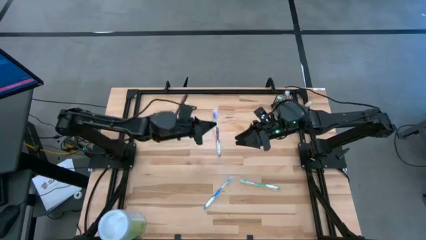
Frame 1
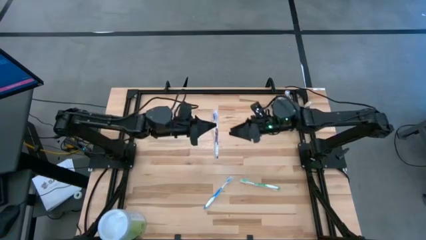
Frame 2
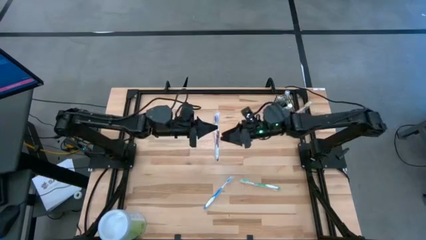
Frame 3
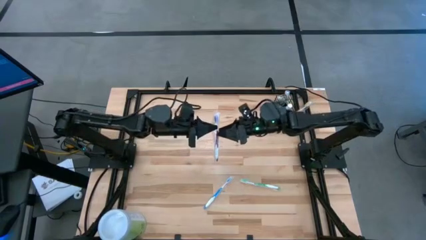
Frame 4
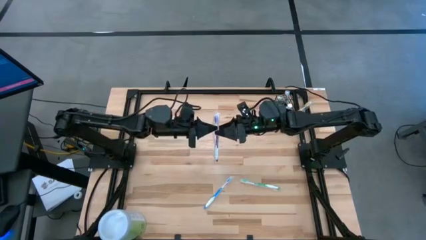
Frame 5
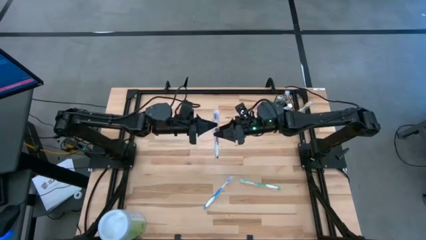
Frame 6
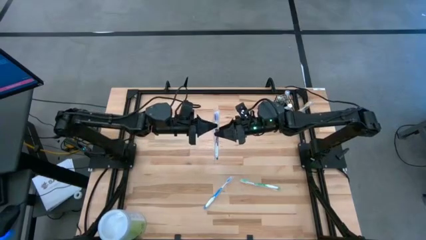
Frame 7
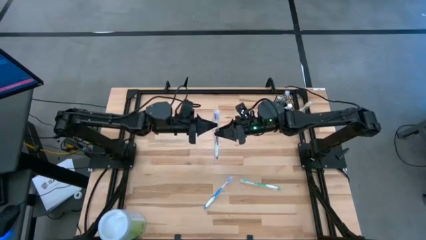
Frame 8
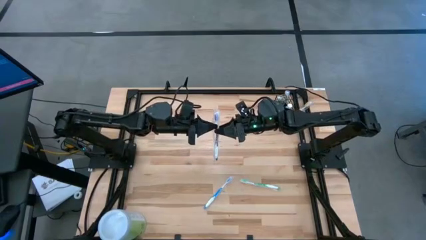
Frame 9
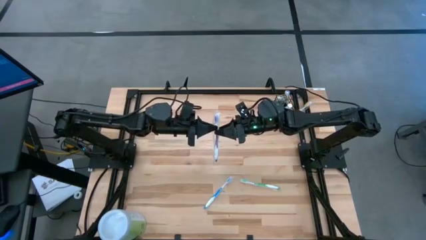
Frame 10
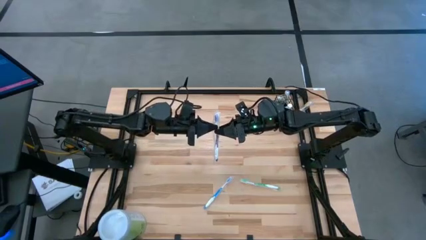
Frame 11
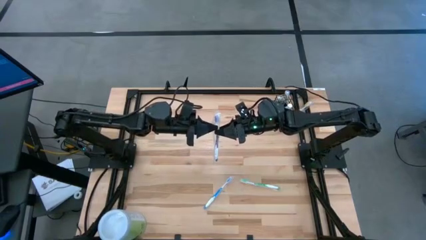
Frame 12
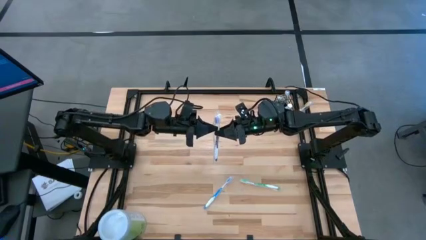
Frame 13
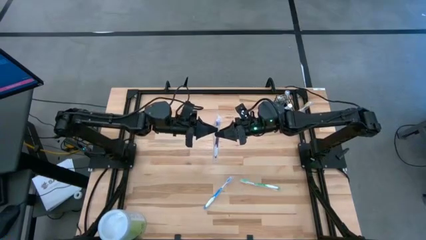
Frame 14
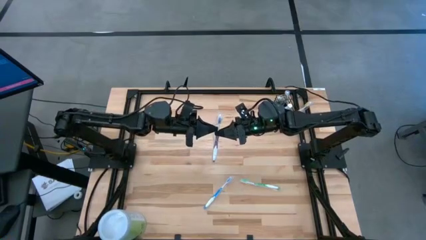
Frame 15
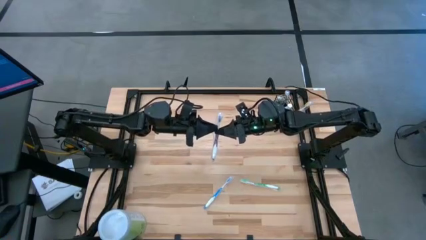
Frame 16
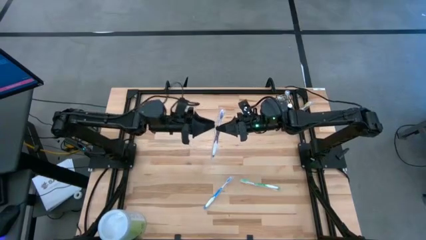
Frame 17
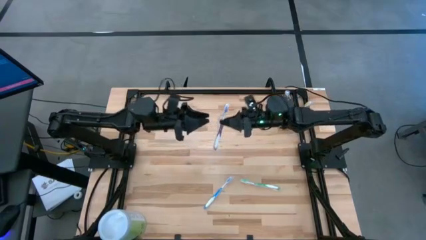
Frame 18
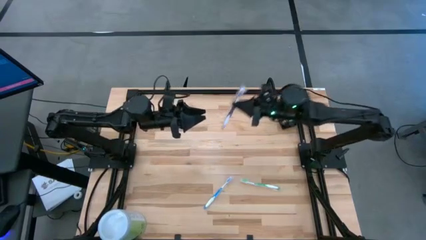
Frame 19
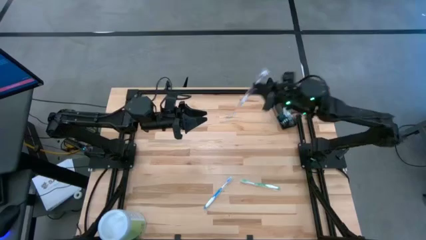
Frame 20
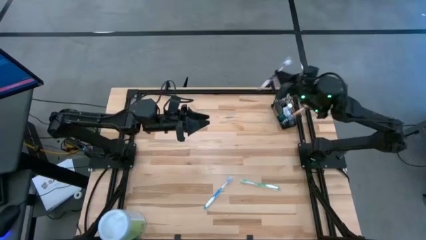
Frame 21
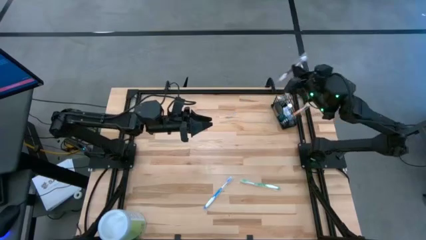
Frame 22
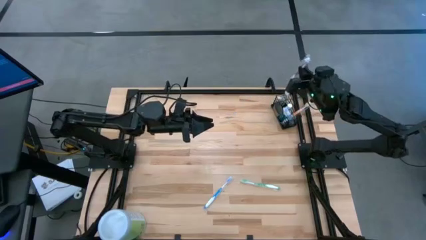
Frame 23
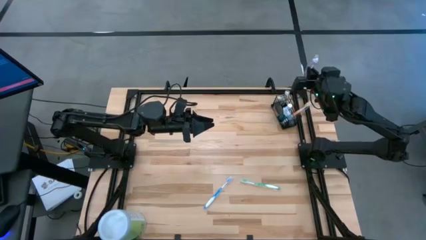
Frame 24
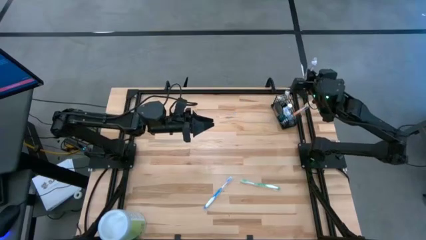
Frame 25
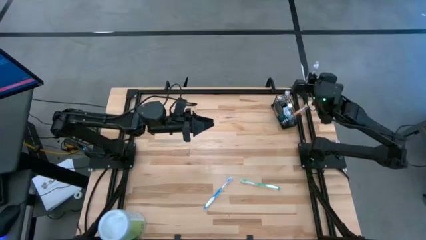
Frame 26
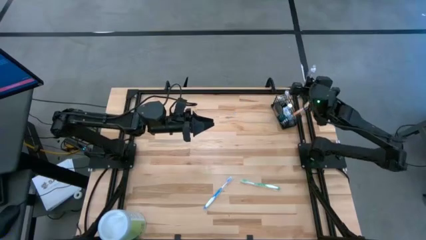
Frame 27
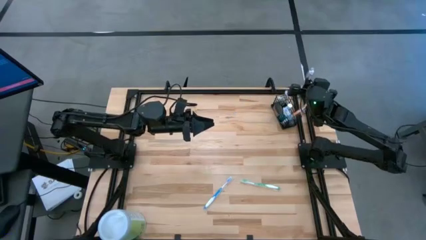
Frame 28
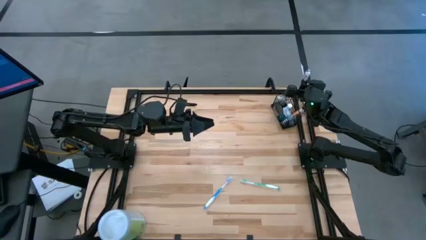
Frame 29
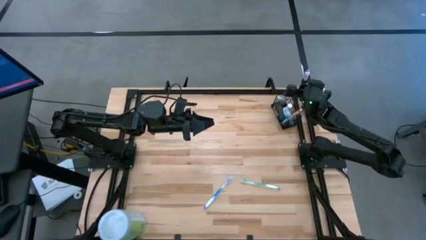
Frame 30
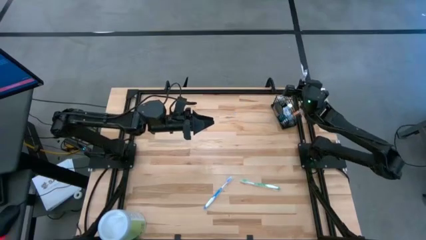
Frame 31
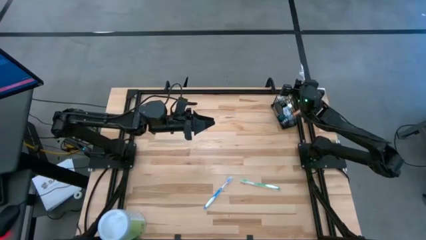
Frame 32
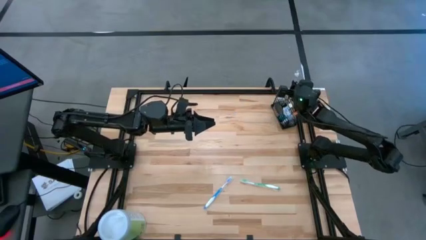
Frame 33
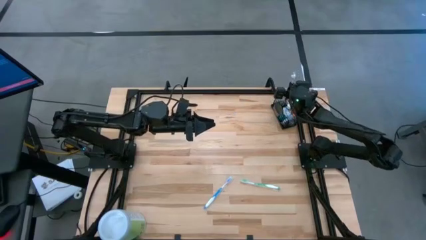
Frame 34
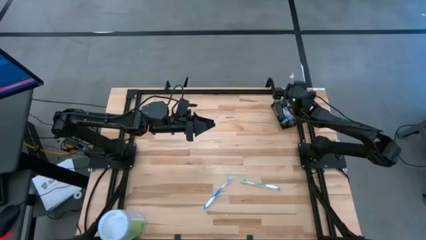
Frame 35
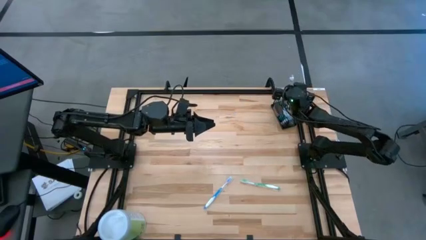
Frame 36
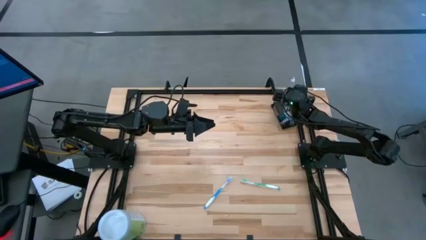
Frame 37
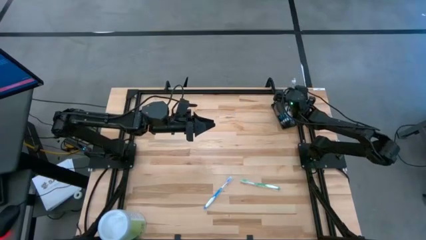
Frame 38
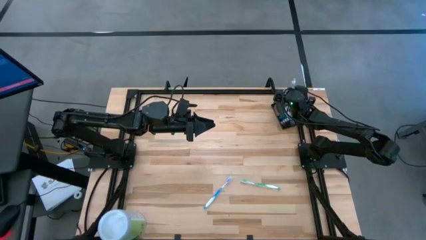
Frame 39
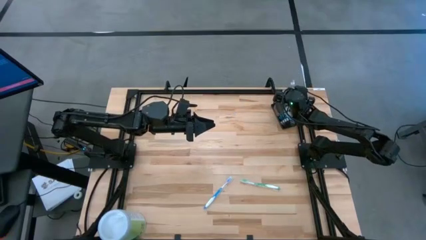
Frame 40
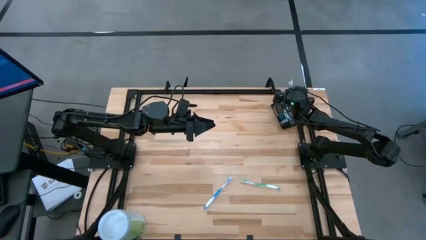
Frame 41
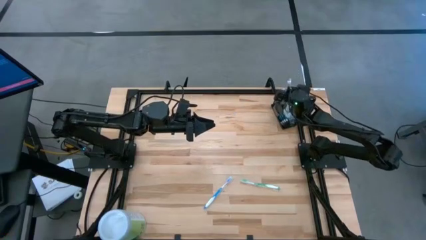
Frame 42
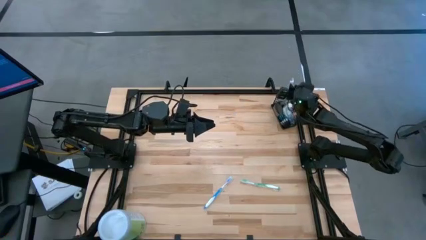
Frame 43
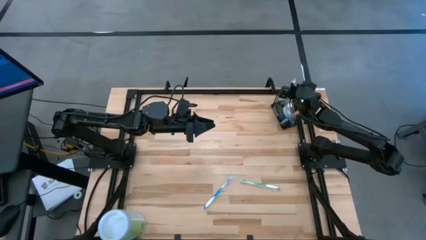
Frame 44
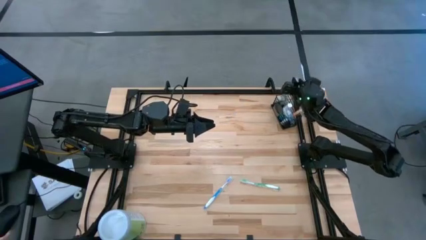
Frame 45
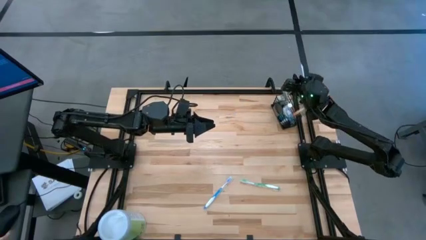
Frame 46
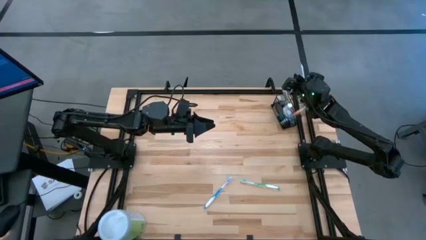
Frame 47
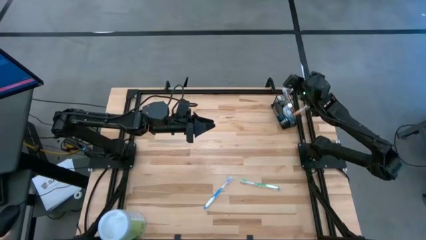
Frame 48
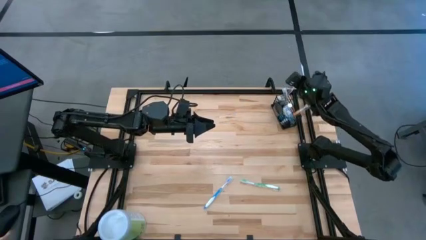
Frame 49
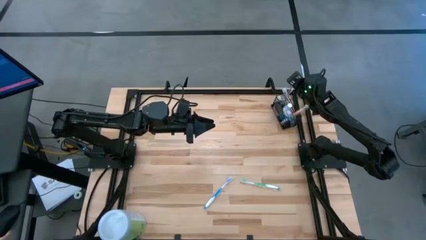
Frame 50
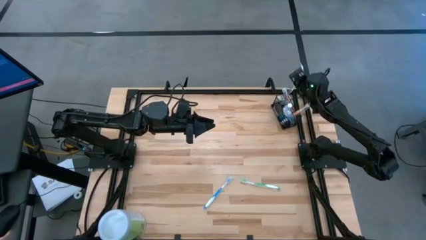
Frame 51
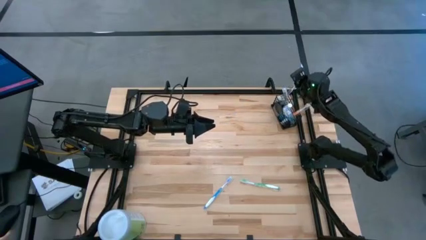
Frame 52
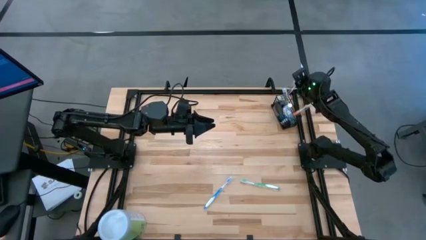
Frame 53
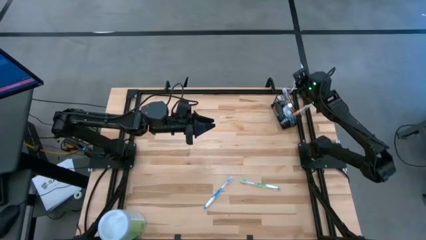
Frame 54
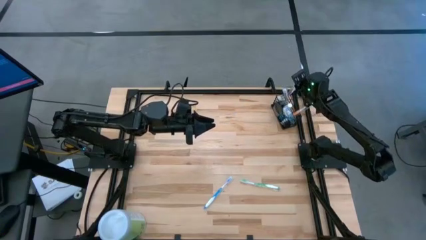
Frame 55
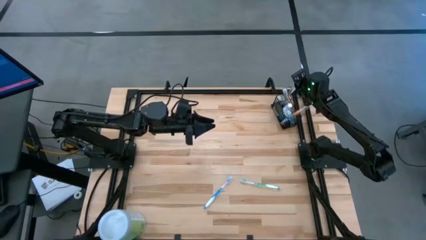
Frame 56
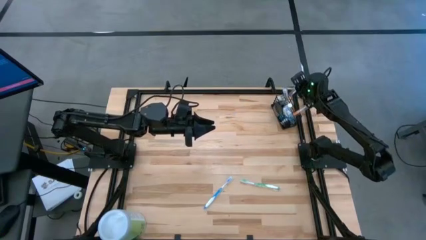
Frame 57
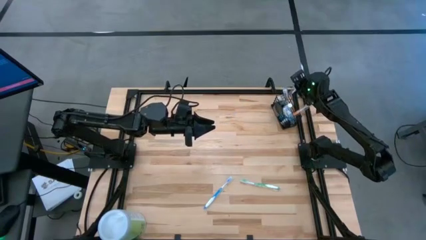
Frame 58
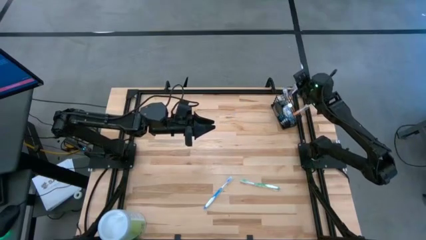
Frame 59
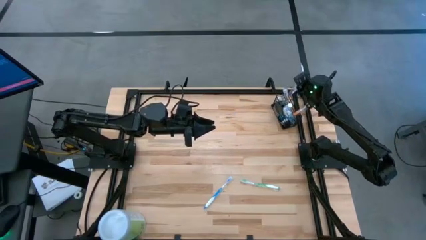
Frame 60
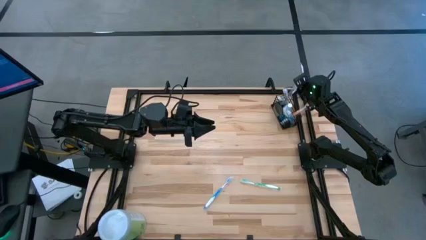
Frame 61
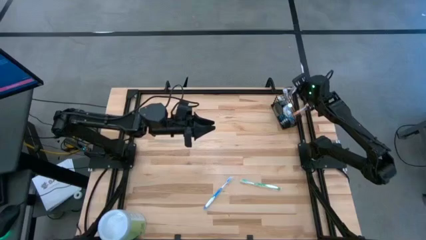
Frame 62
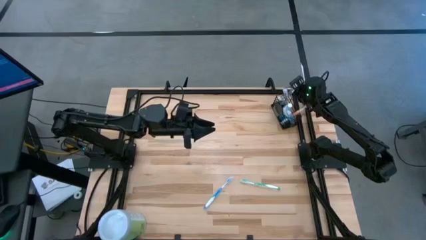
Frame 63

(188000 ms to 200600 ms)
Task: Pick & Place toothbrushing station
Put the purple toothbrush in the left section of wire organizer

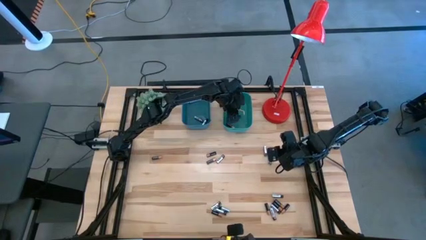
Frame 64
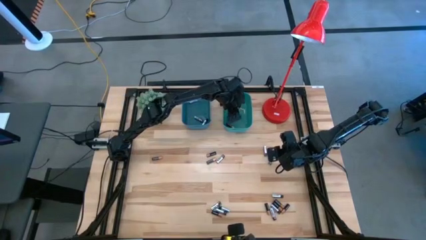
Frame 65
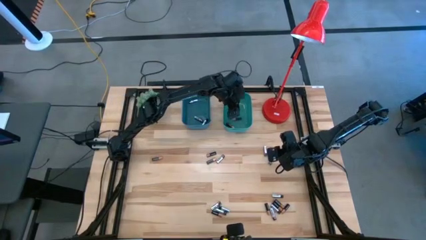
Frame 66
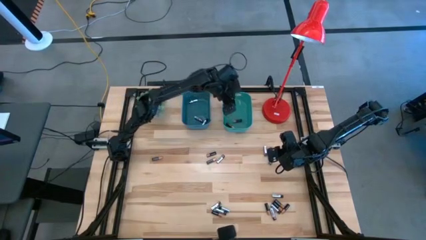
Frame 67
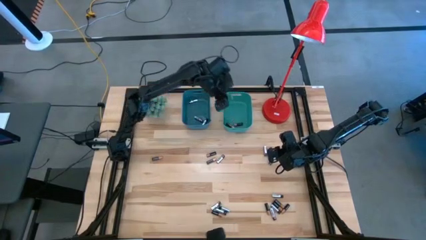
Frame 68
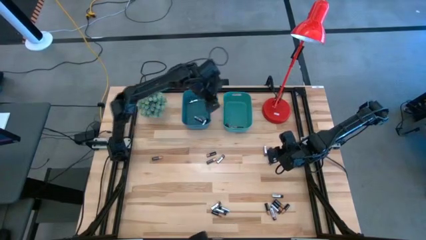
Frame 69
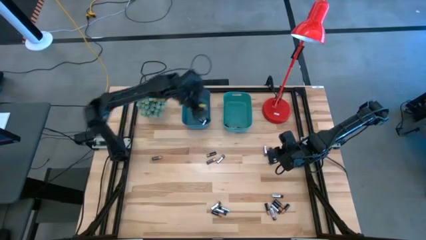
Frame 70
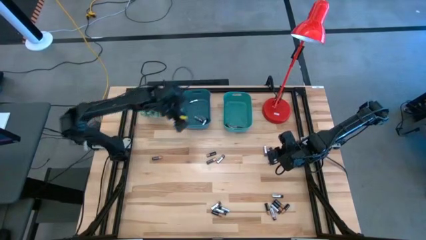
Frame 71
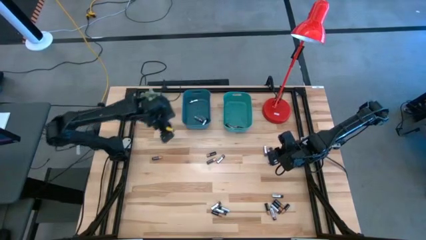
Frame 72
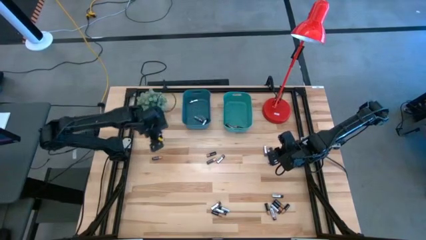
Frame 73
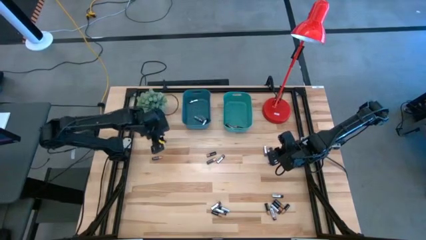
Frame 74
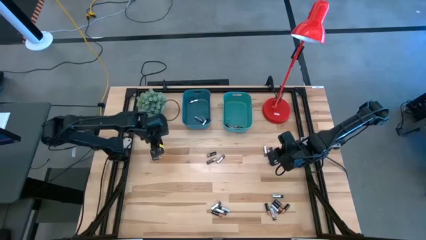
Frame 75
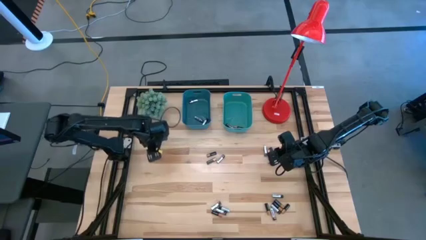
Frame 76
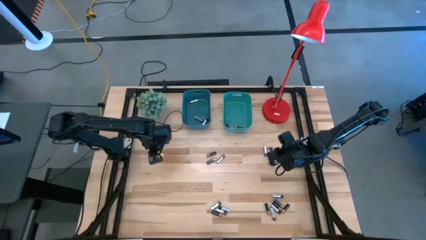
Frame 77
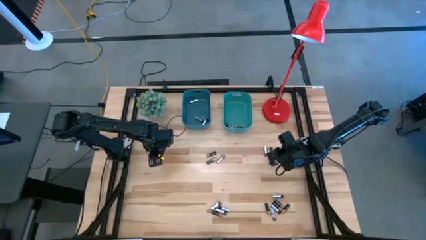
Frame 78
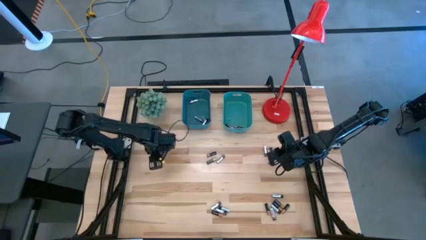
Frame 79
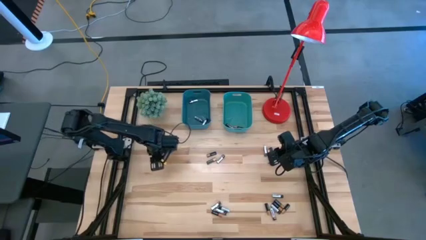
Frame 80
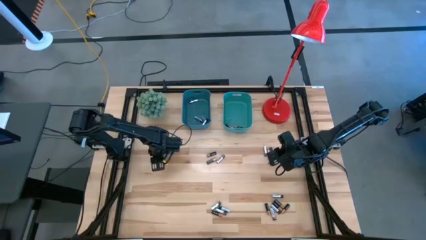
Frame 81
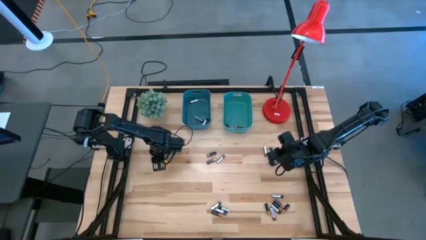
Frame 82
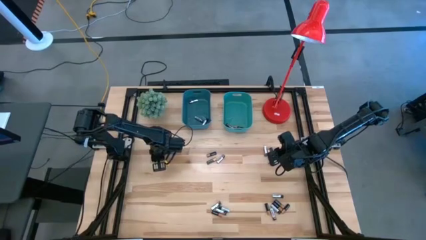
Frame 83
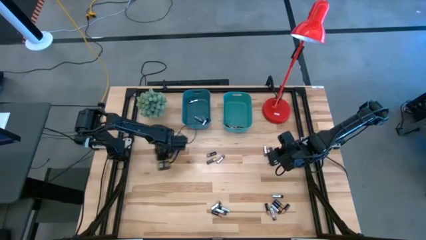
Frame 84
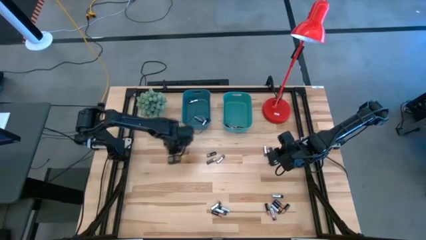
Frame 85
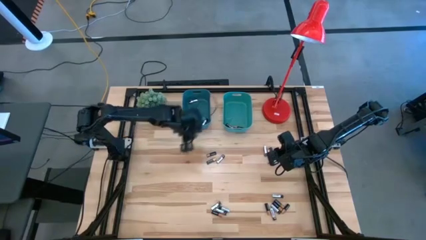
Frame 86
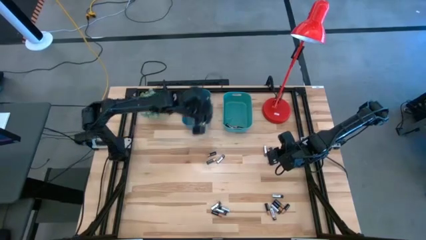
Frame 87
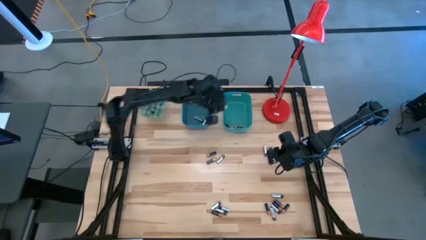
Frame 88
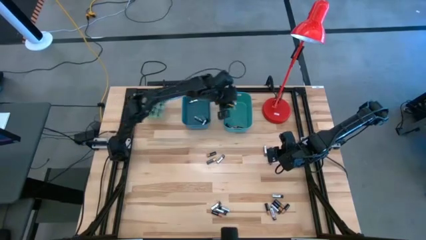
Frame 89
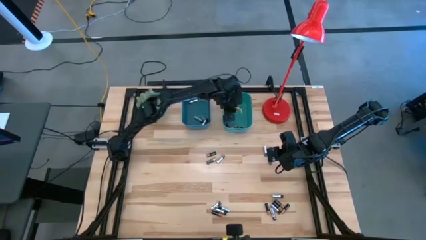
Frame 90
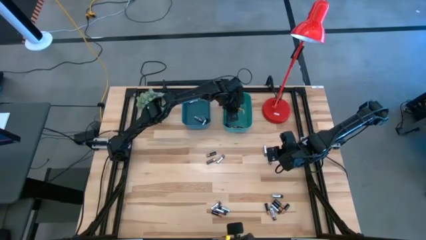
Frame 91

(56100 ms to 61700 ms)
Task: Sort batteries
Put the black battery into the green bin
